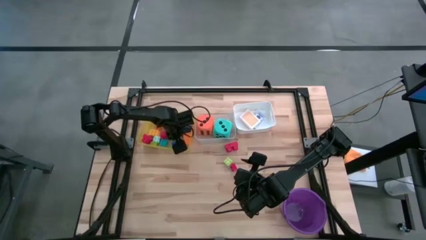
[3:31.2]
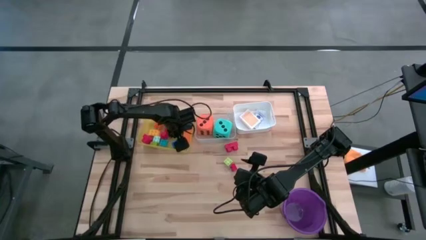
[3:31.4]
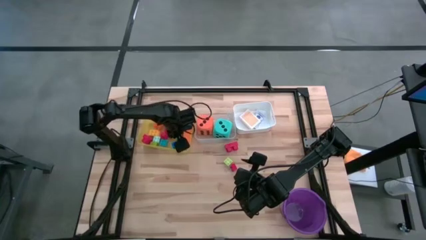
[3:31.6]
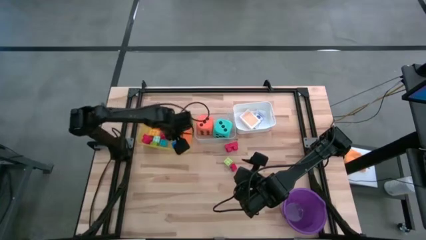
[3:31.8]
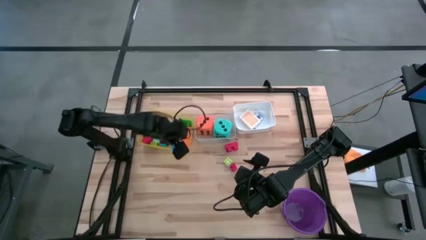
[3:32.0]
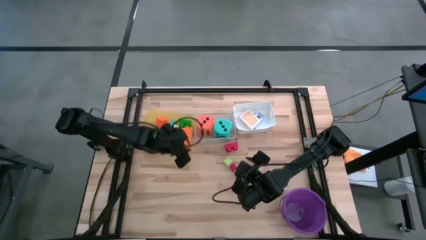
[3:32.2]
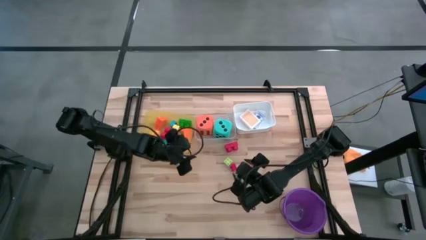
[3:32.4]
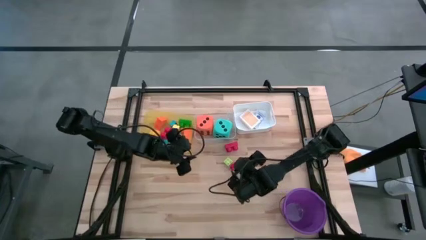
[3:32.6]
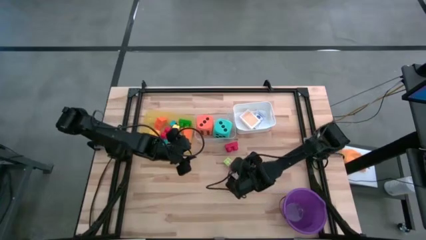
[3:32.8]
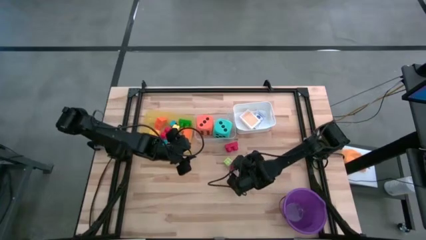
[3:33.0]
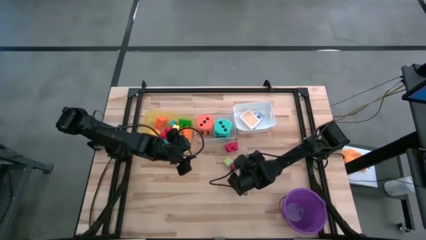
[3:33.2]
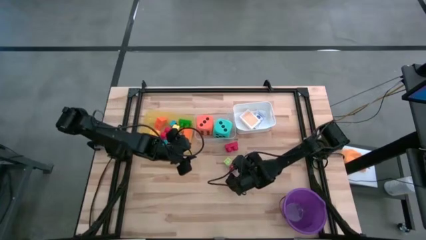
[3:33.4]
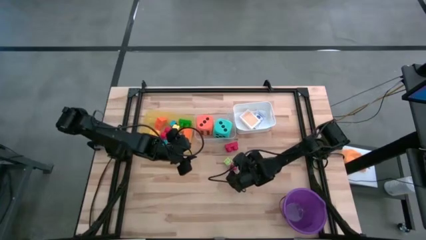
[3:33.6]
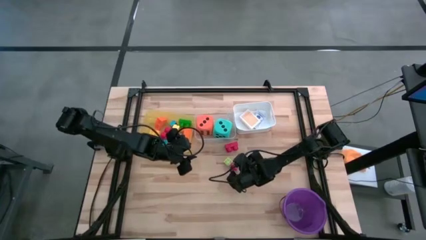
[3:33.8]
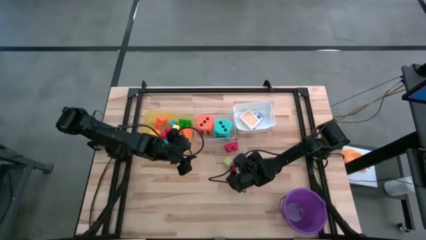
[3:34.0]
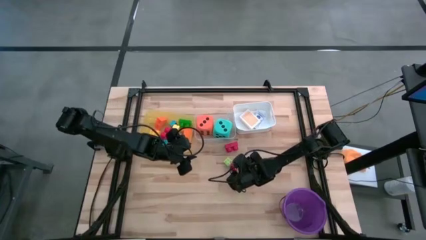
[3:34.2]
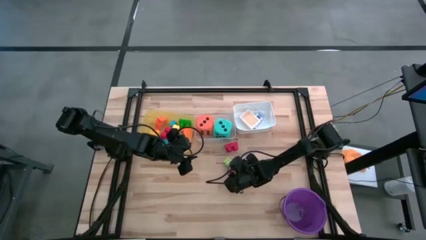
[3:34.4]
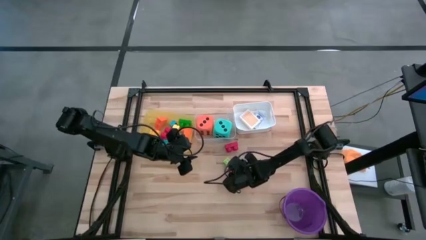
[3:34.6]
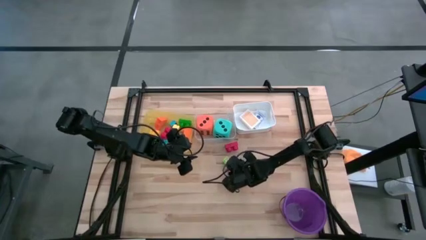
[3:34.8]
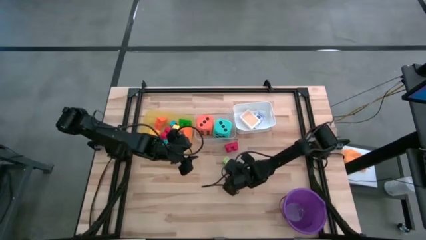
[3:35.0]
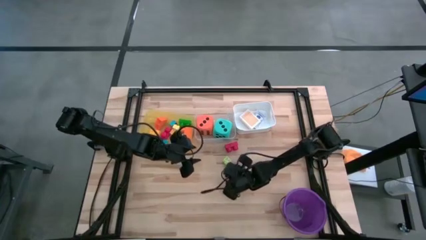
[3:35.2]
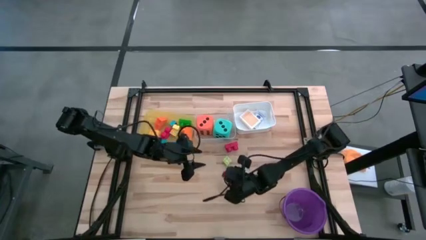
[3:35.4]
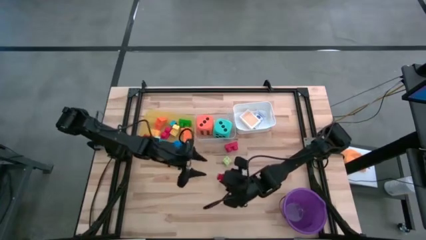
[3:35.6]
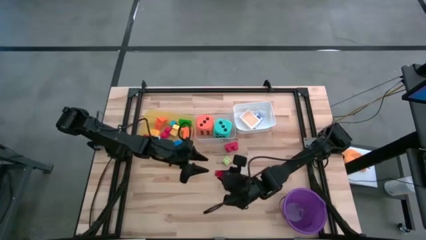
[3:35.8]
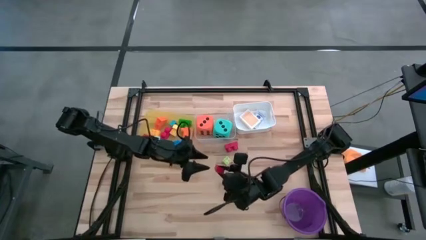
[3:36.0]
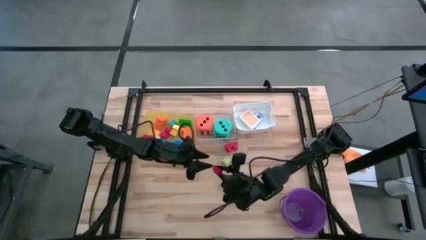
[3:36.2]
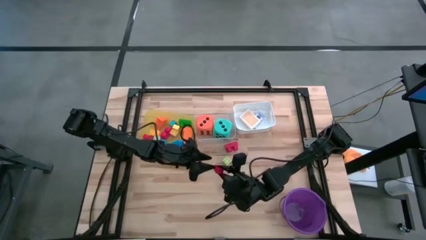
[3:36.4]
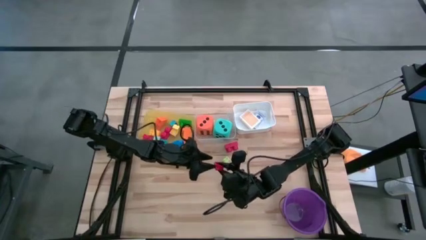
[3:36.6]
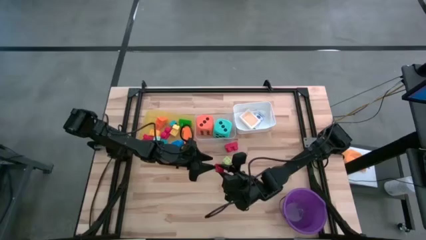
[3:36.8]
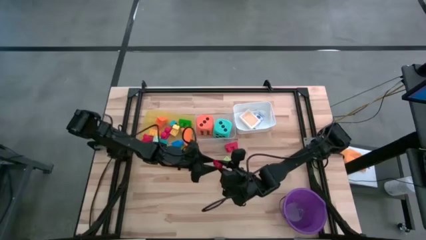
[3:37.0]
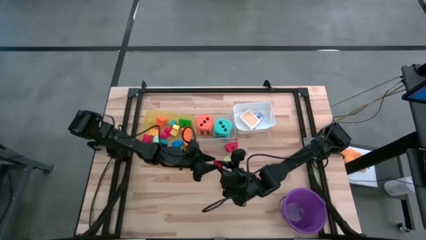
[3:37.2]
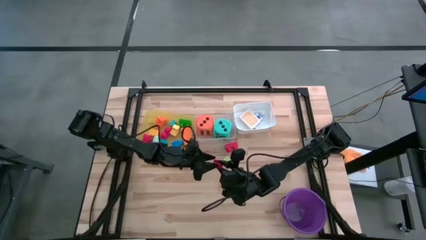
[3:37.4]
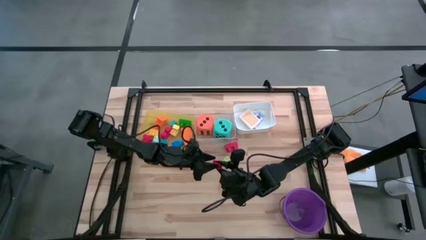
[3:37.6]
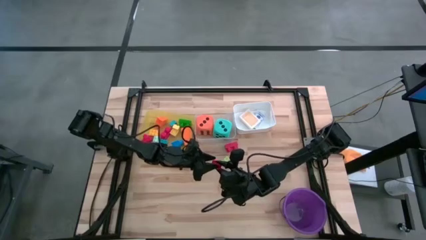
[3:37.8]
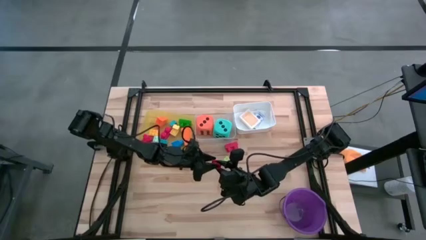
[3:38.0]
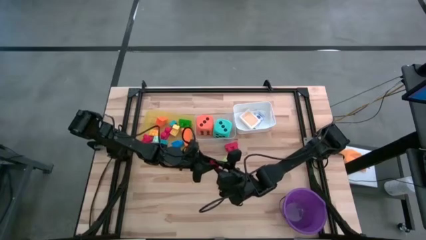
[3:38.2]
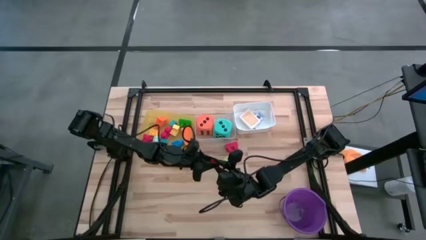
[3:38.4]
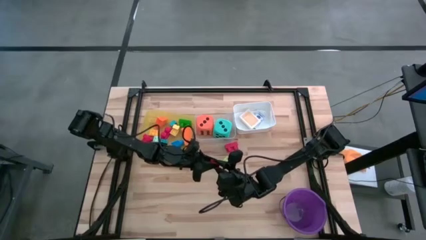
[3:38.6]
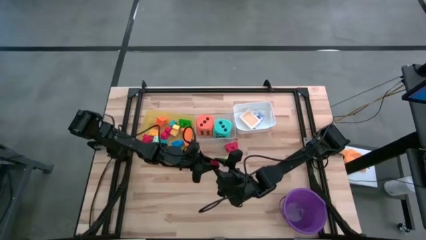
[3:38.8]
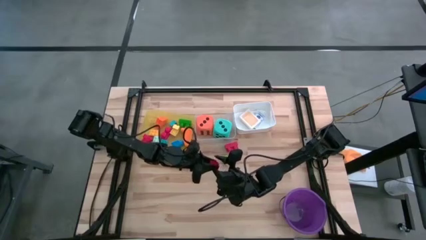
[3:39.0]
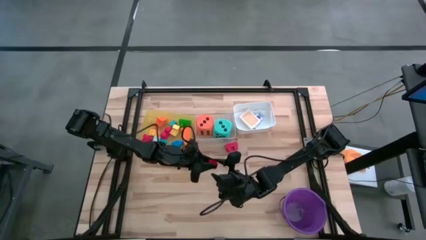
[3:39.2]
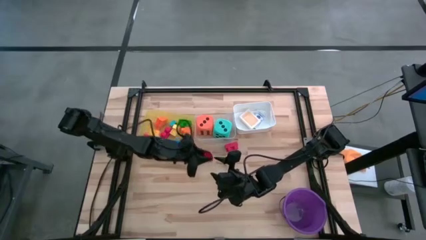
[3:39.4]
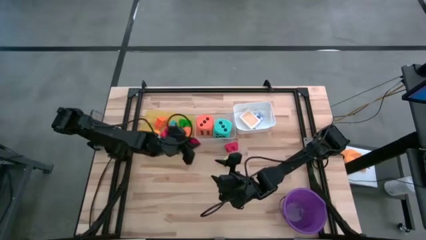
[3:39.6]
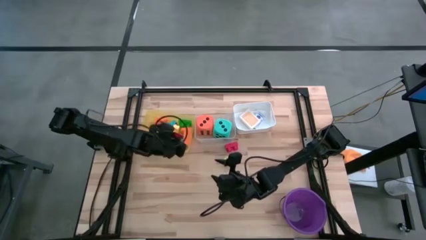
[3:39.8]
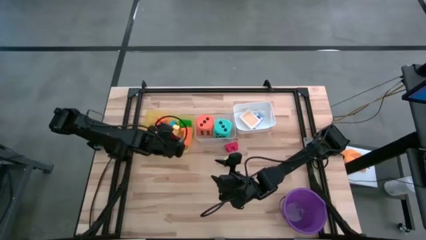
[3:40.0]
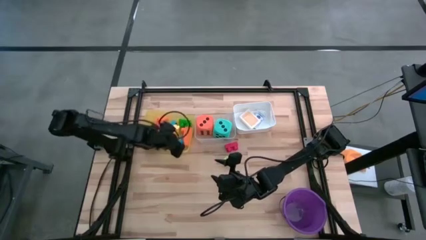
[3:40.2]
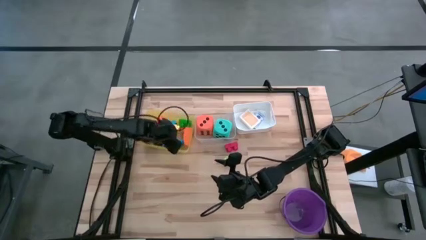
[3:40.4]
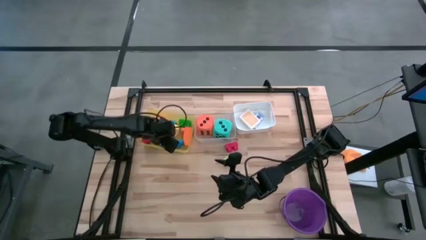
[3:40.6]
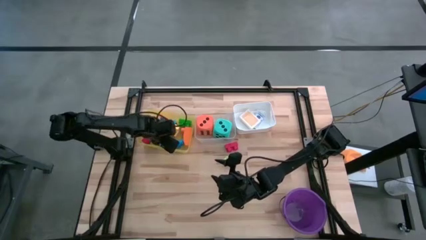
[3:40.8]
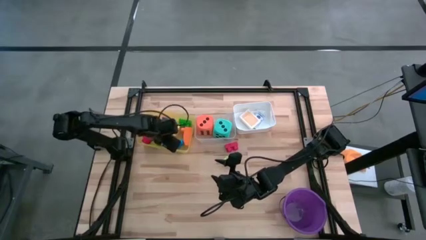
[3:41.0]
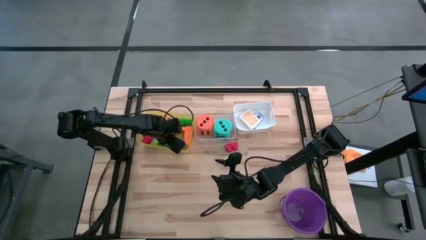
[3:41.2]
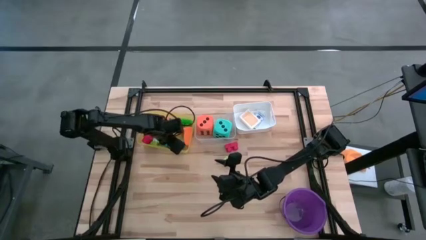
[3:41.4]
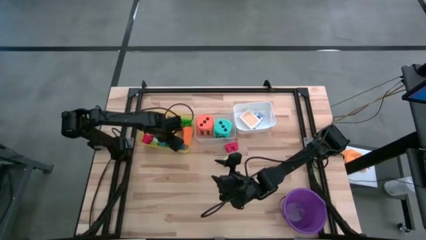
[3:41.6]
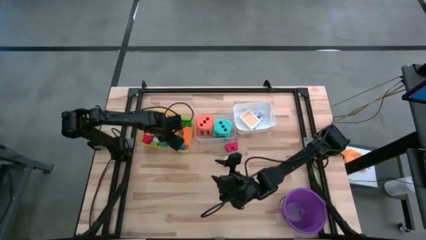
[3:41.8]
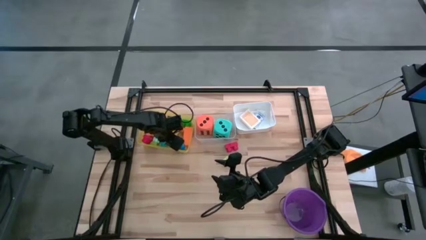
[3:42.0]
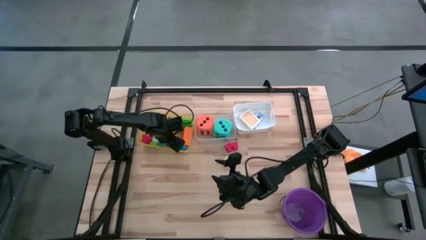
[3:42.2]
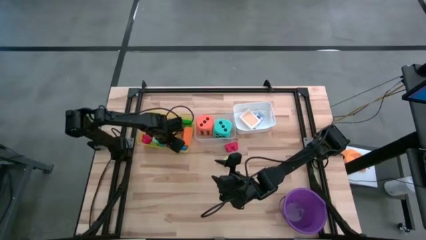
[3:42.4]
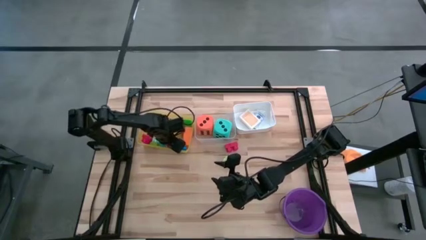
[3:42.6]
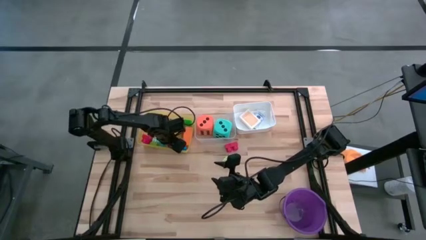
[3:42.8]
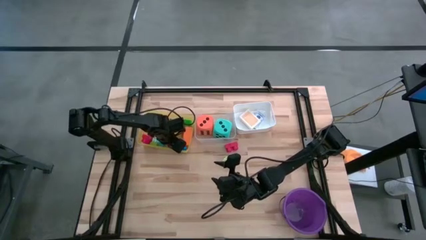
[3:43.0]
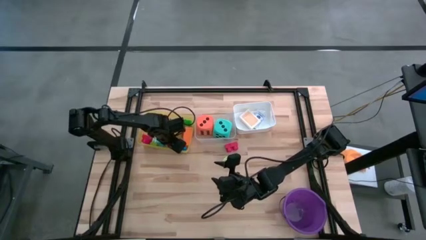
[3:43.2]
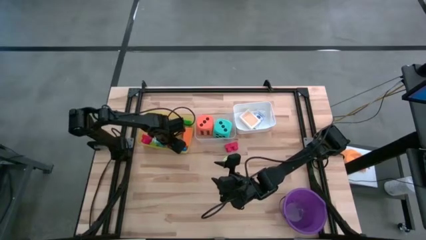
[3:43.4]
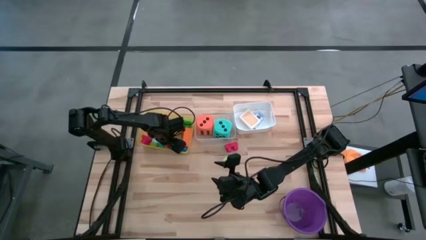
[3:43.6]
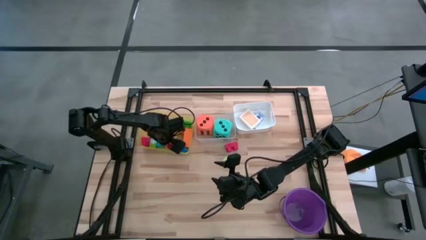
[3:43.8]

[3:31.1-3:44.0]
Task: Pick & Place Toys
Put the red game piece into the yellow bin

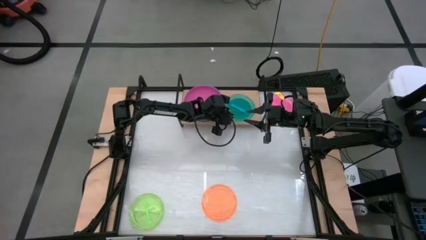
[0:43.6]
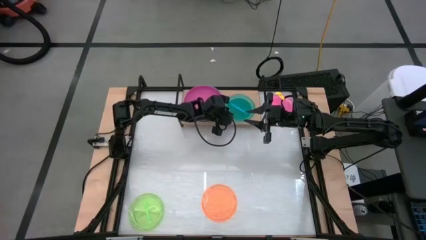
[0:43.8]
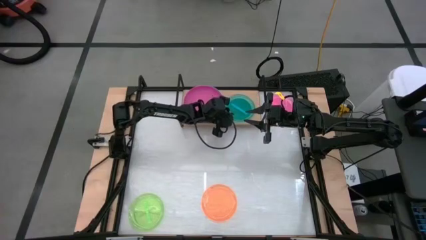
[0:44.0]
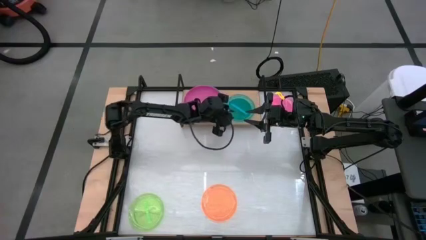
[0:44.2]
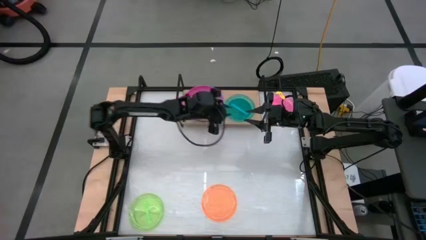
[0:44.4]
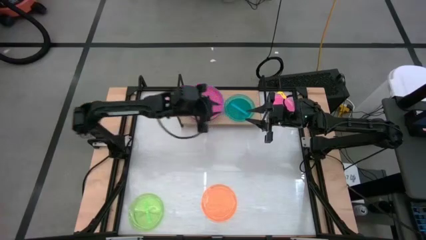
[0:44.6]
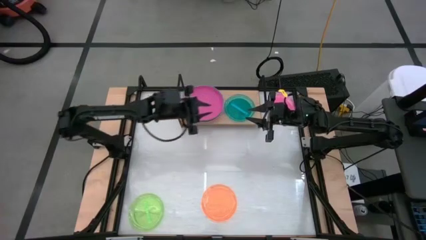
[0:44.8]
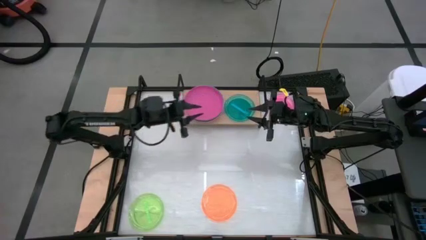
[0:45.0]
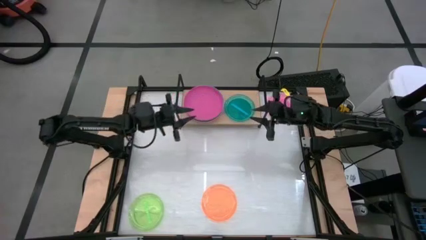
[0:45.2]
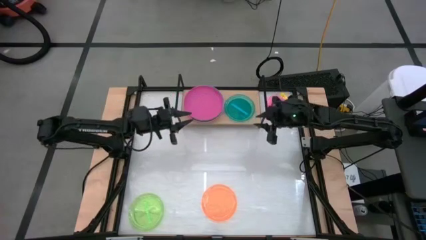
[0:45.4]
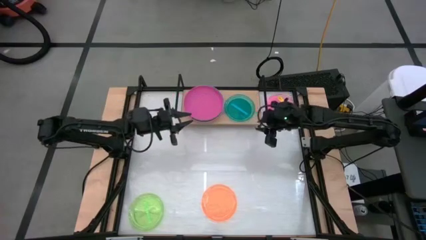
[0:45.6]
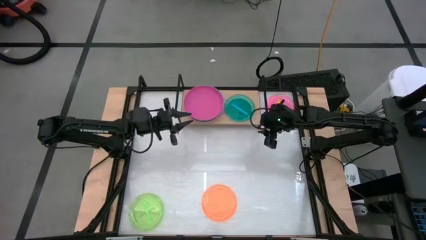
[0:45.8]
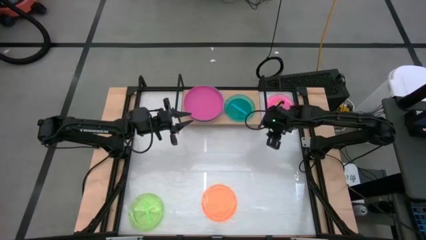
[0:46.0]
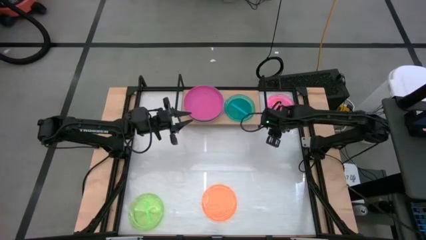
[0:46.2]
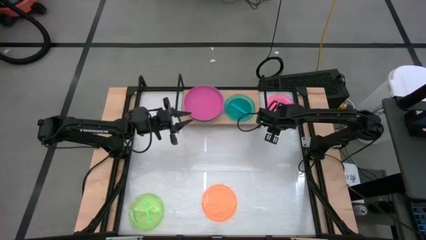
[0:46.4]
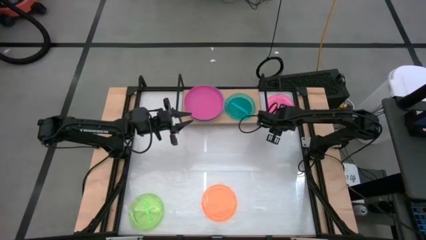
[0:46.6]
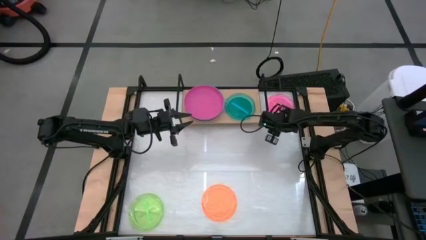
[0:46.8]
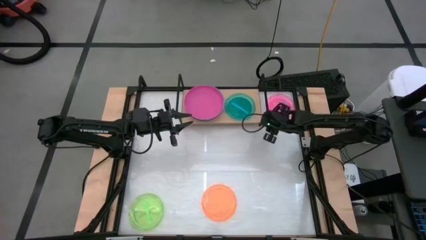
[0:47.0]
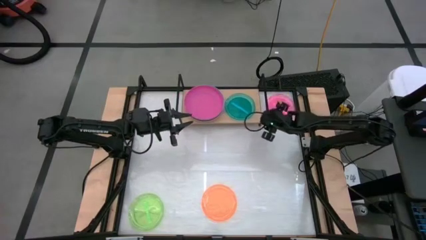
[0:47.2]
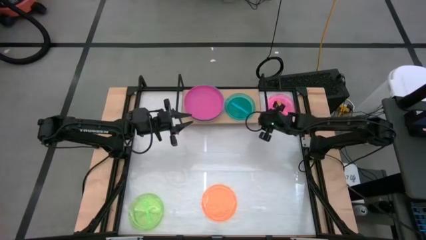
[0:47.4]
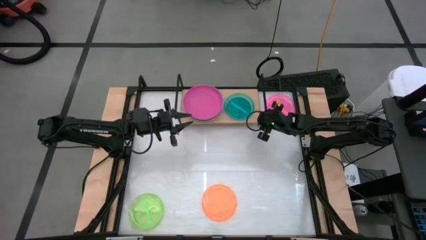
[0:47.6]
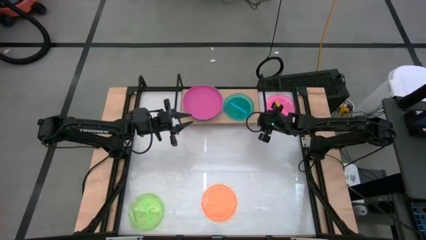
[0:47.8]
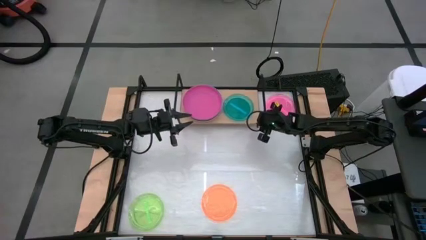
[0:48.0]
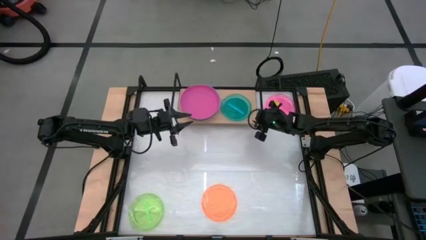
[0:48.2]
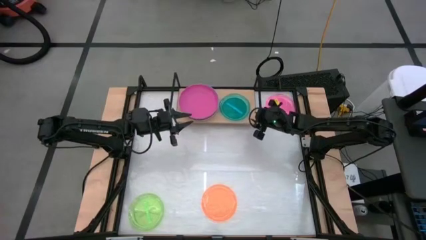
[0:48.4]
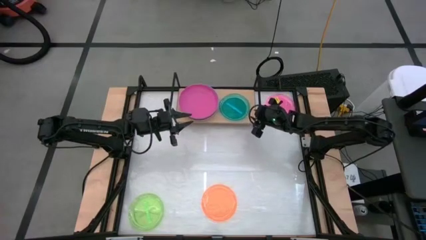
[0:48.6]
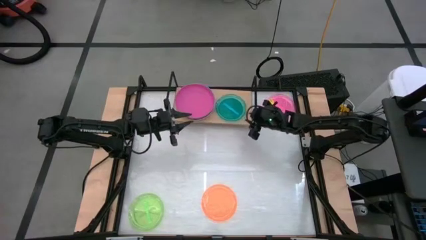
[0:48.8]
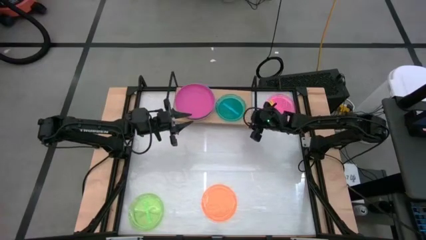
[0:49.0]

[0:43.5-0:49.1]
Task: Place and stack plates onto a shelf
Adjust the shelf
